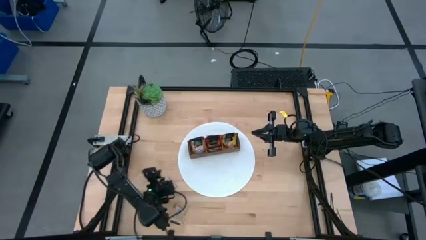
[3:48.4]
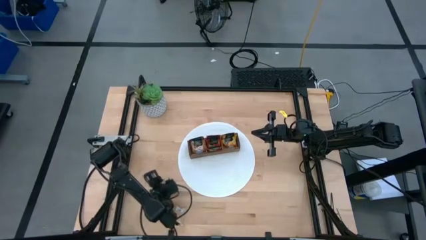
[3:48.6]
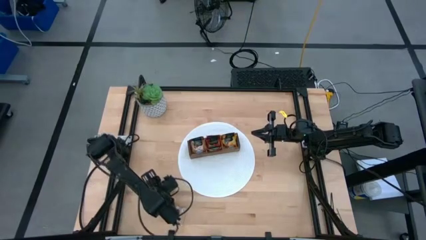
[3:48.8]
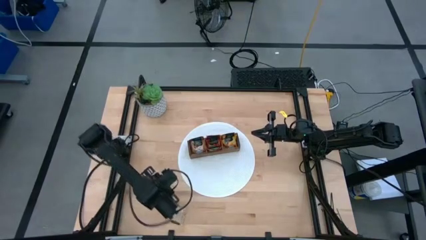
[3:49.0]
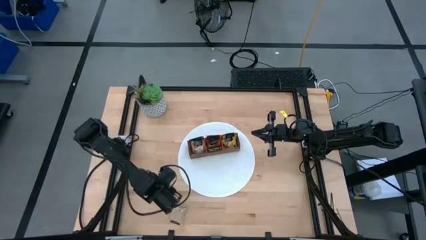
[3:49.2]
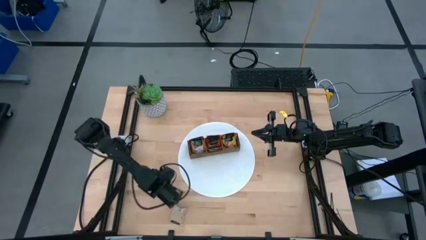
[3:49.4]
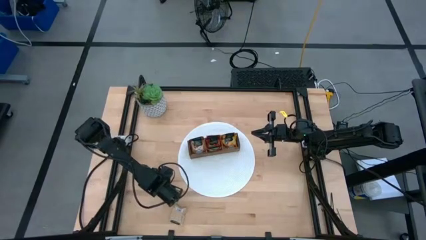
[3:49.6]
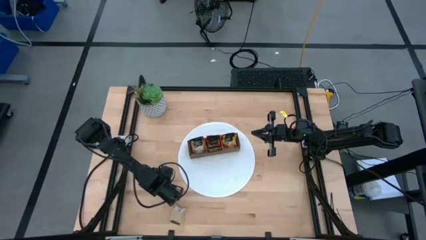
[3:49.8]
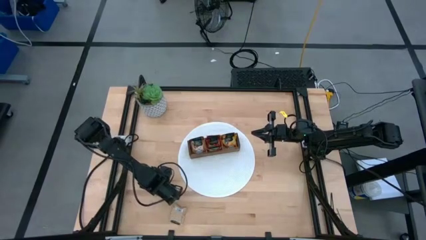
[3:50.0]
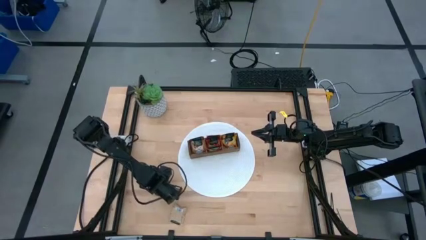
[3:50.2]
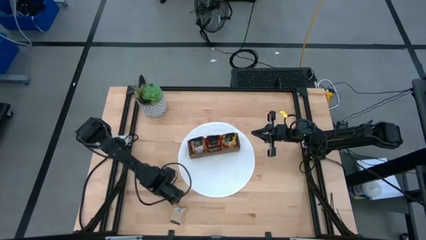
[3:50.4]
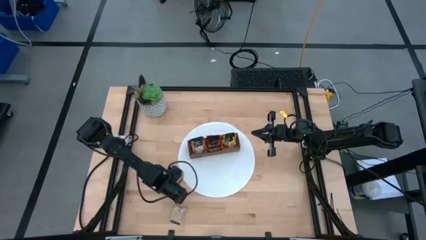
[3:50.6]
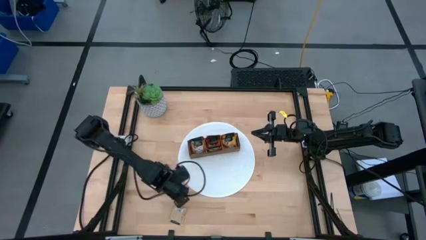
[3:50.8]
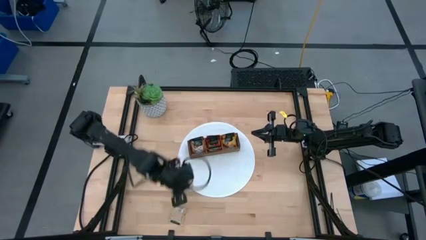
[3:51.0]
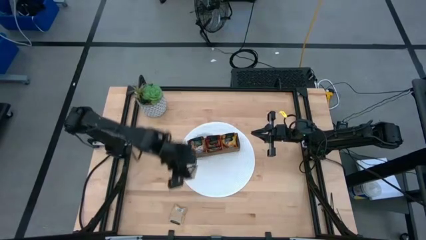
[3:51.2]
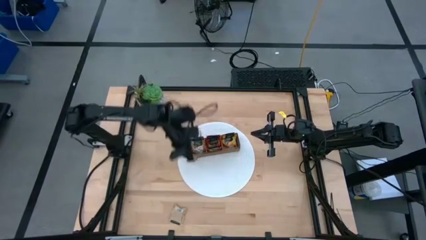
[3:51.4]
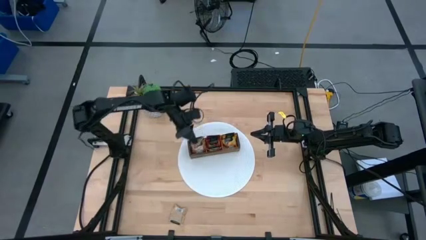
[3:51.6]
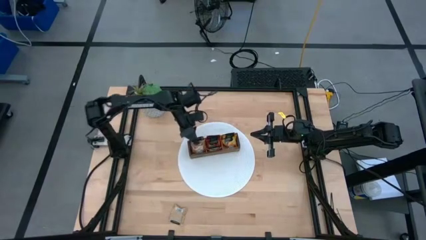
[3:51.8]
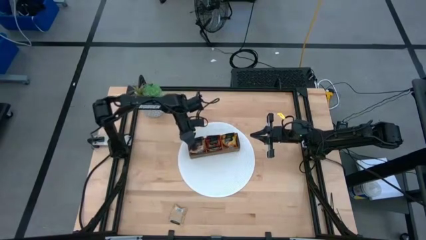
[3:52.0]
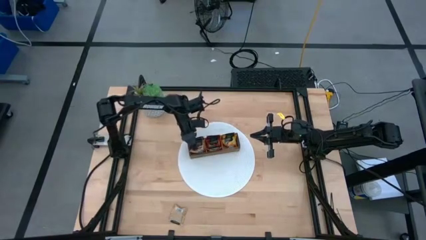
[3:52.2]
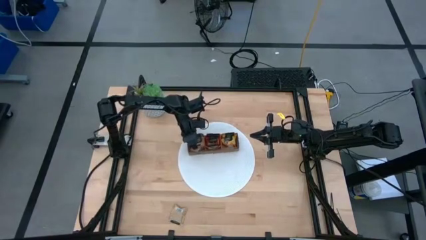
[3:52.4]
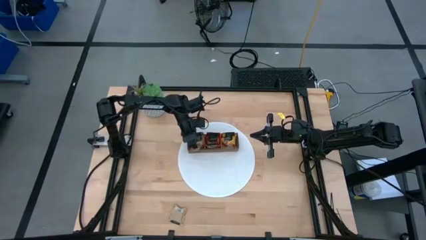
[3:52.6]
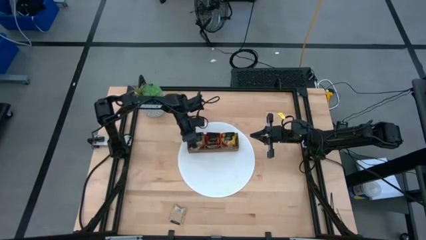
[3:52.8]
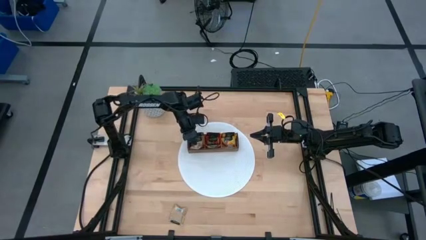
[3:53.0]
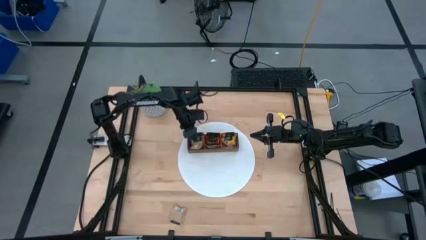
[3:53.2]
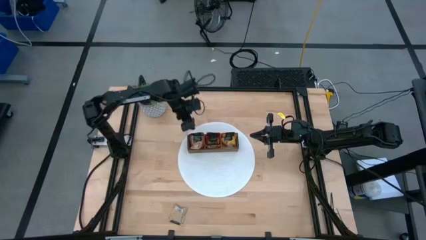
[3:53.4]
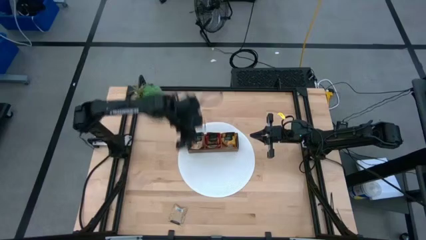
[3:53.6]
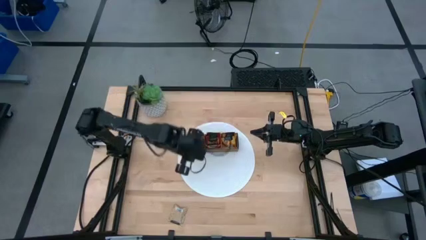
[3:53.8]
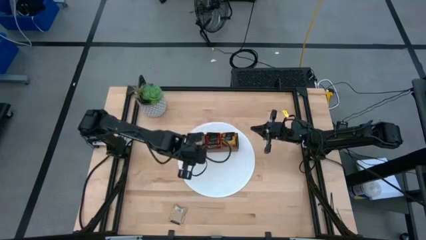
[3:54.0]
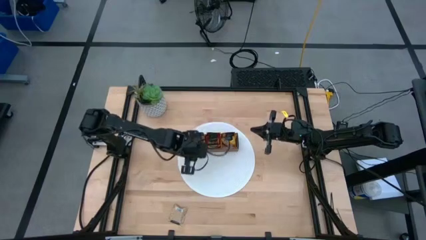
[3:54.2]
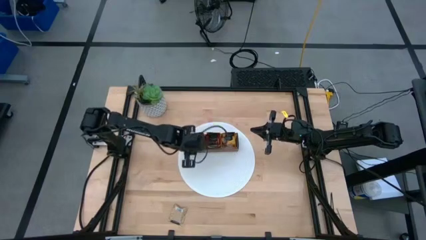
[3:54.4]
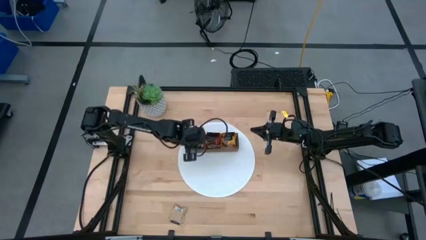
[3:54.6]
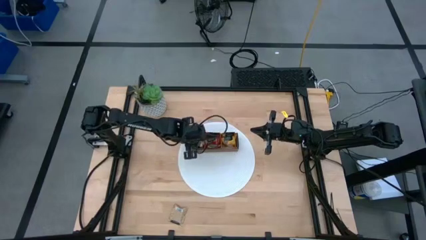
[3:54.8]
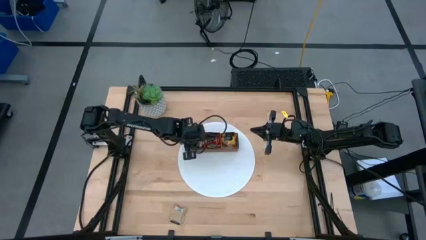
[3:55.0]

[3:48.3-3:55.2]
Task: Pick & Place Tea
Put the brown tea bag into the left section of the wooden organizer

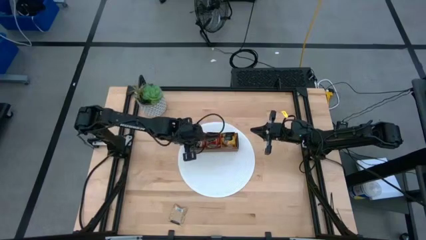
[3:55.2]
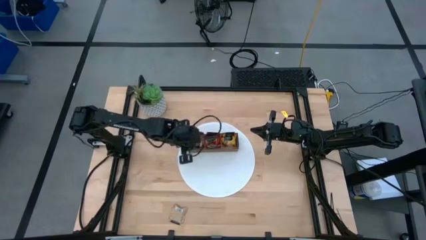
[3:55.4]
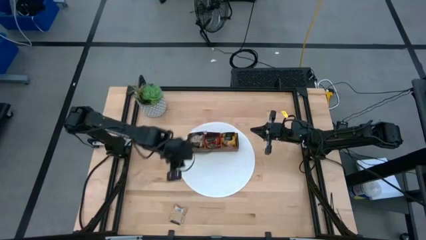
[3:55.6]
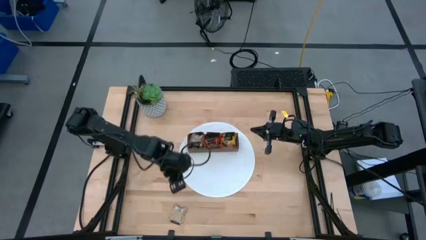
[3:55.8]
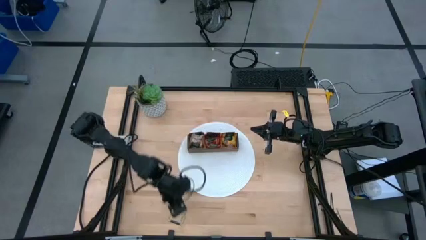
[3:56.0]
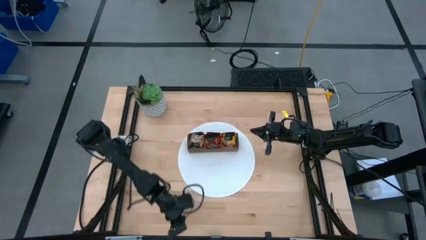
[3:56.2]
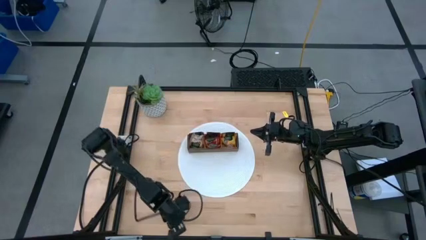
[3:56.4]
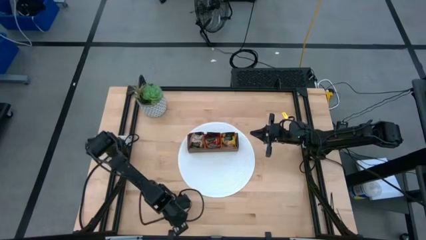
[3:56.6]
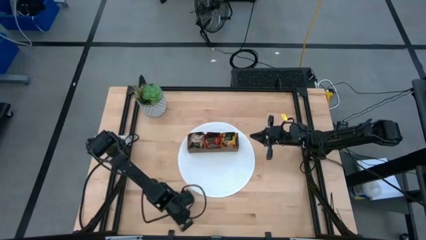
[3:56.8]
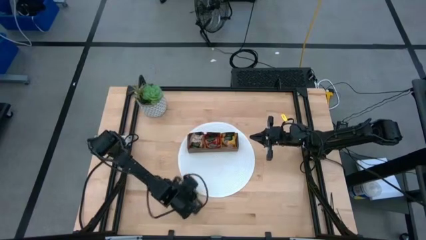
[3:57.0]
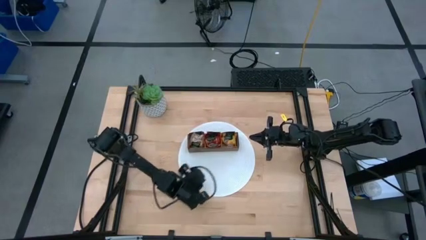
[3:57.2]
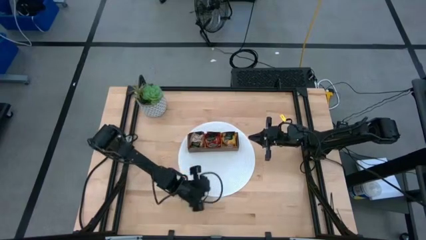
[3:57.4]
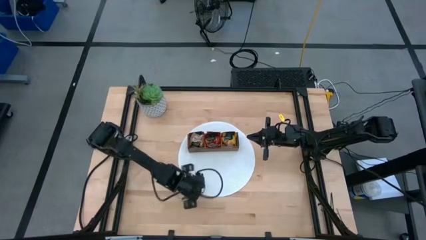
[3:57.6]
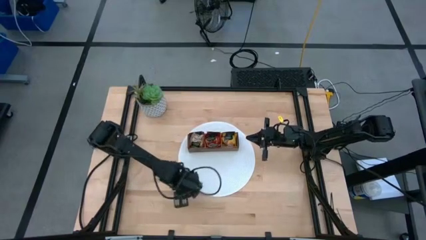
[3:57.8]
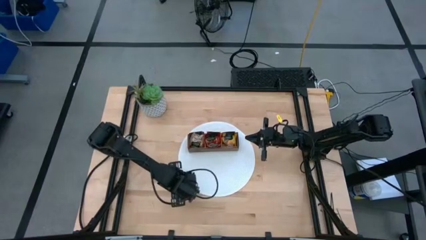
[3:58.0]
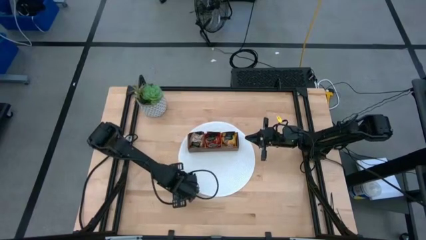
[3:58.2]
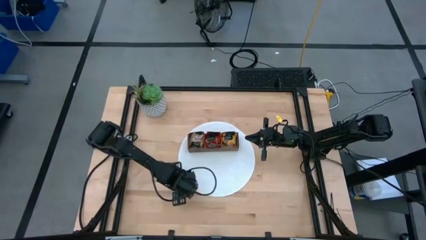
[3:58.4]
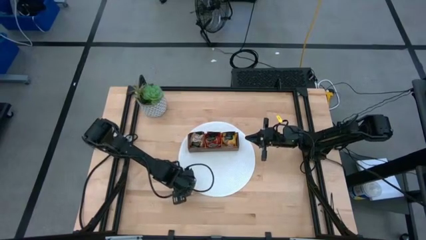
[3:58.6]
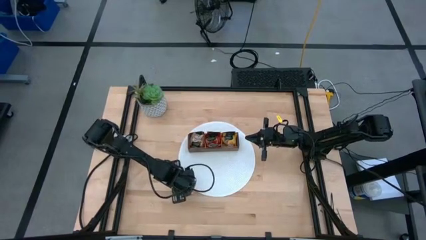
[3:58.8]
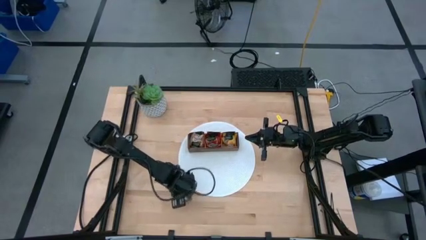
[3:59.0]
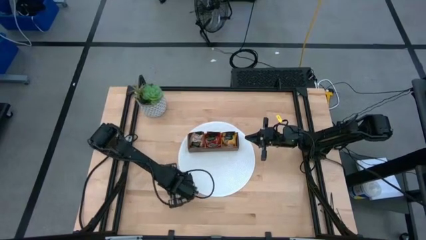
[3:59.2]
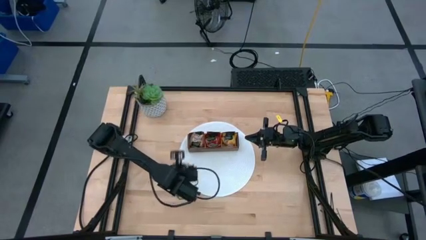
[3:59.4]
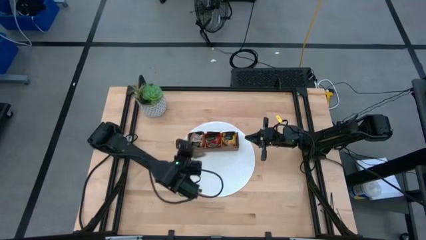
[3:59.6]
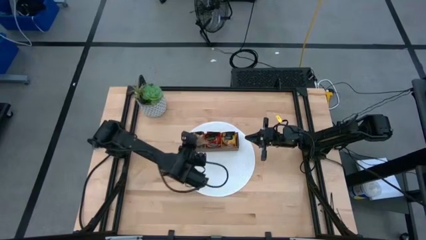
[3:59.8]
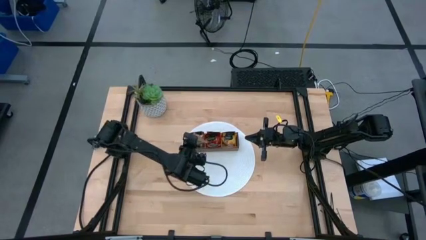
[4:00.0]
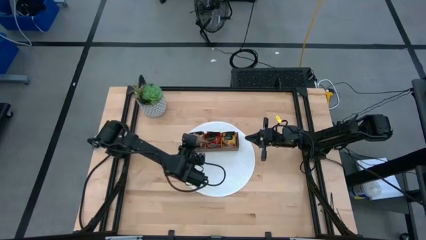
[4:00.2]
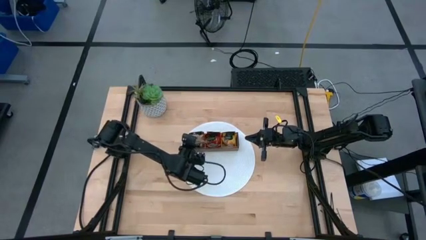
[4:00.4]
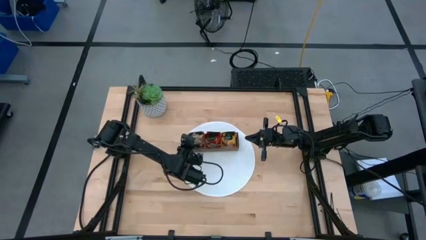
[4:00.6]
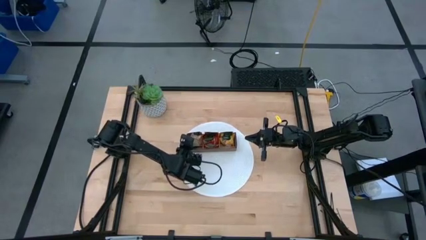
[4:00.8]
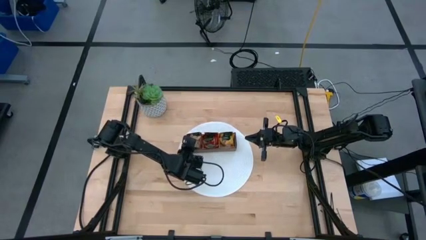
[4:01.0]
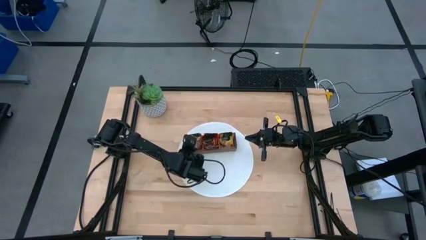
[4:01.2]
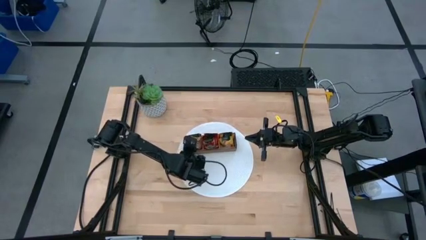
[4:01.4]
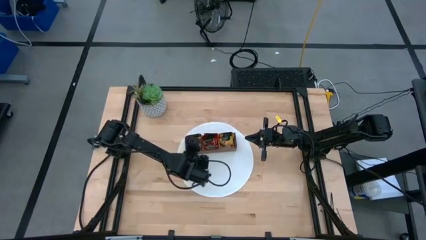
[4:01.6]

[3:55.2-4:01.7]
Put the brown tea bag into the left section of the wooden organizer
